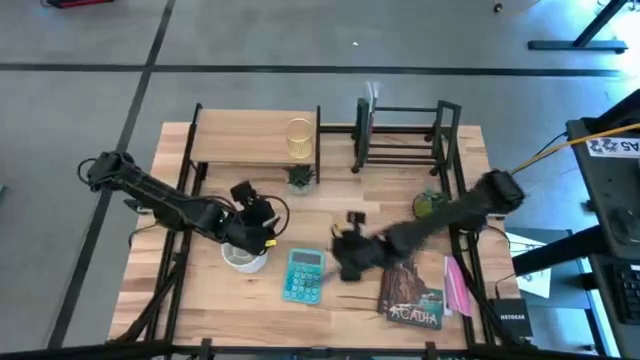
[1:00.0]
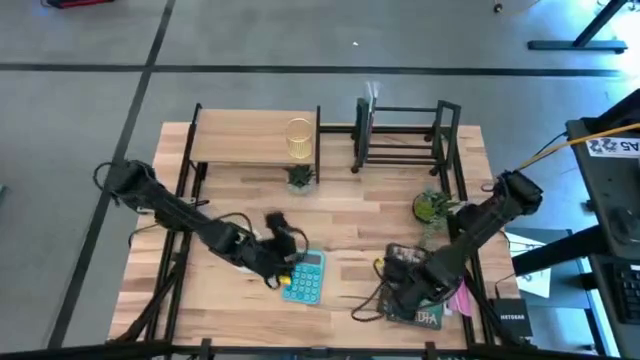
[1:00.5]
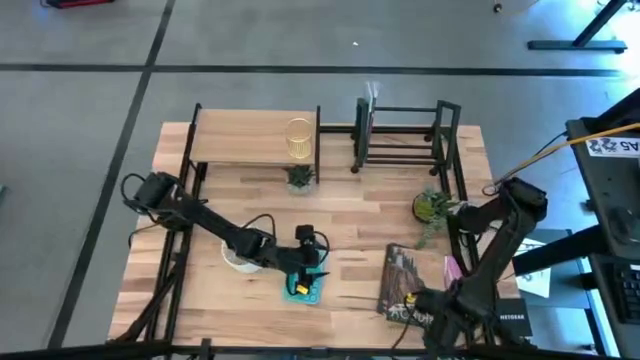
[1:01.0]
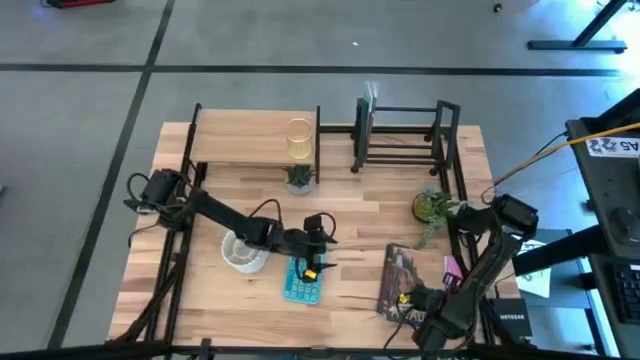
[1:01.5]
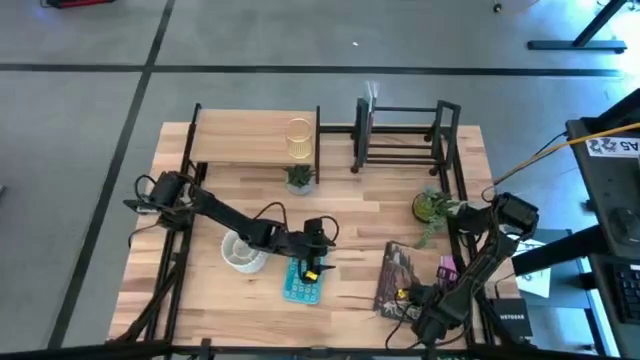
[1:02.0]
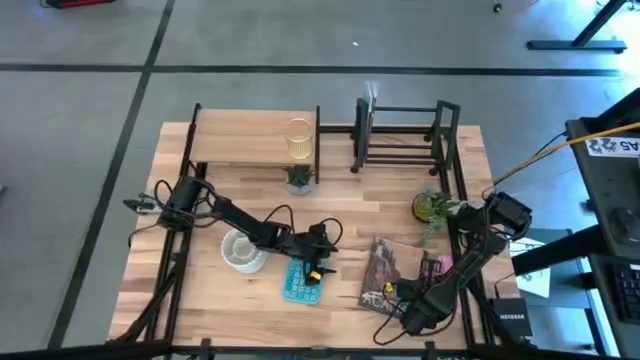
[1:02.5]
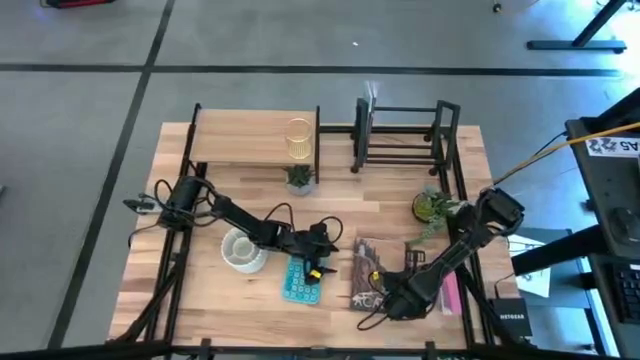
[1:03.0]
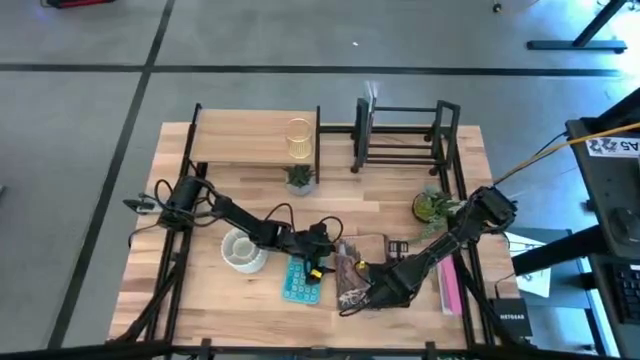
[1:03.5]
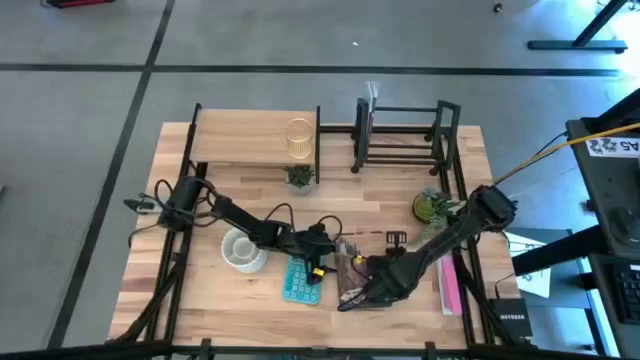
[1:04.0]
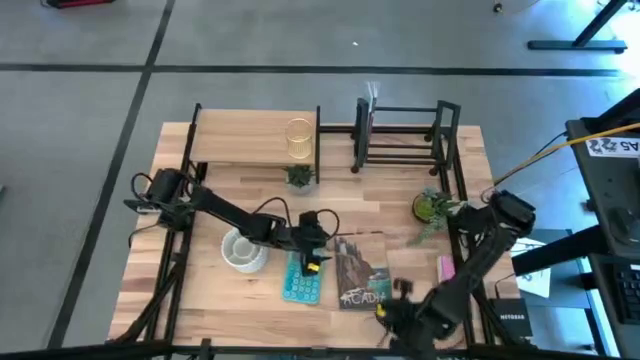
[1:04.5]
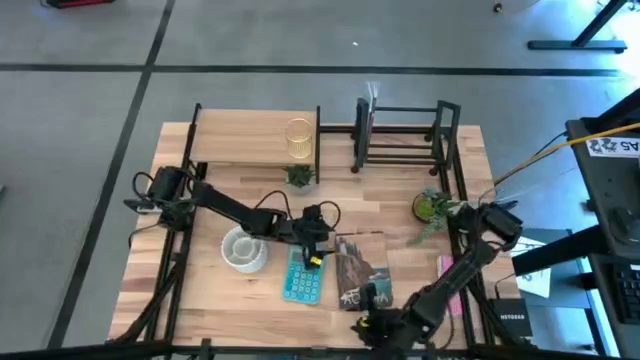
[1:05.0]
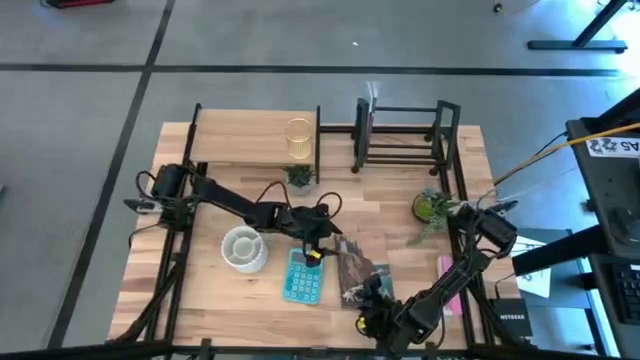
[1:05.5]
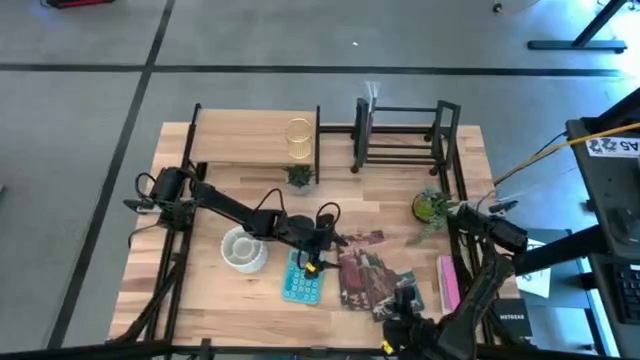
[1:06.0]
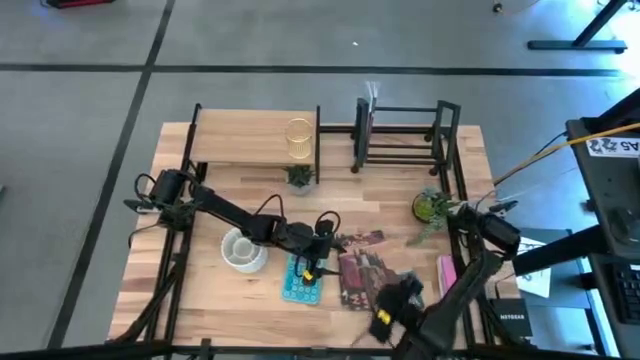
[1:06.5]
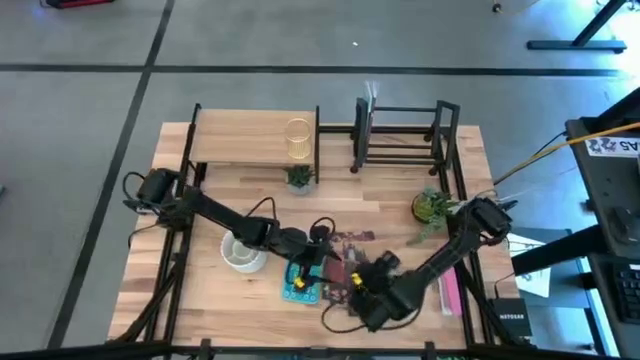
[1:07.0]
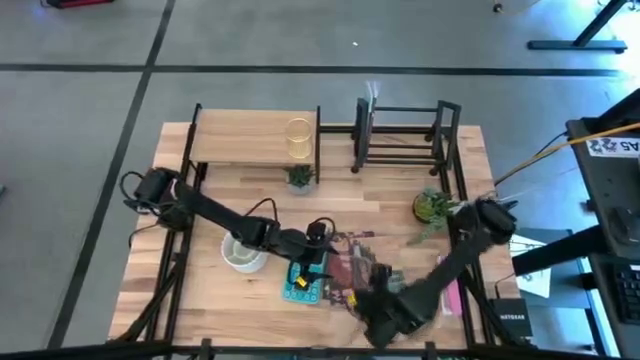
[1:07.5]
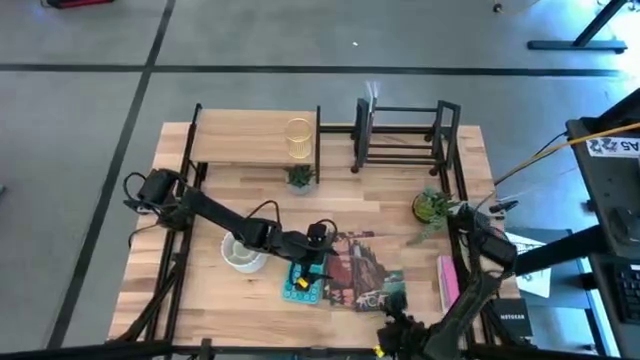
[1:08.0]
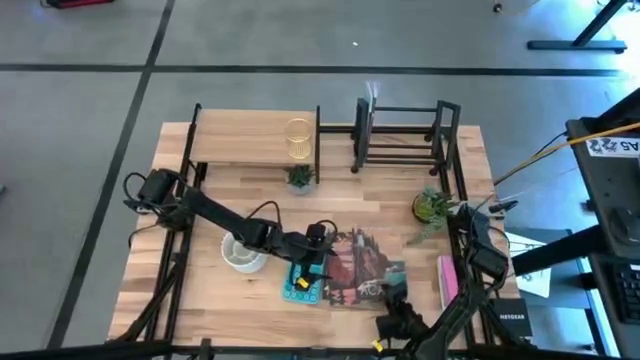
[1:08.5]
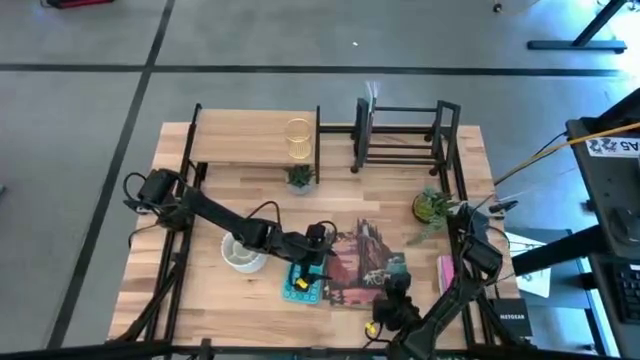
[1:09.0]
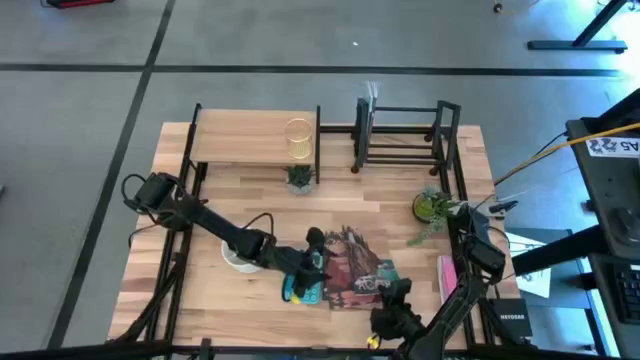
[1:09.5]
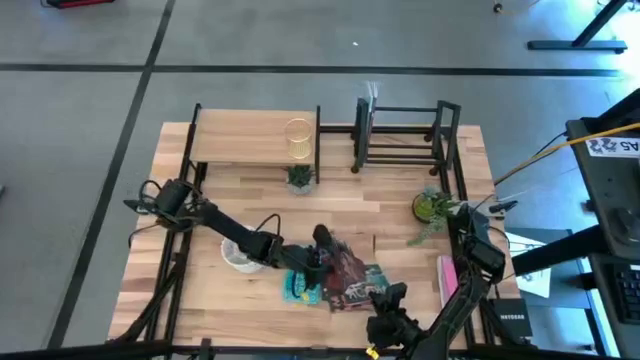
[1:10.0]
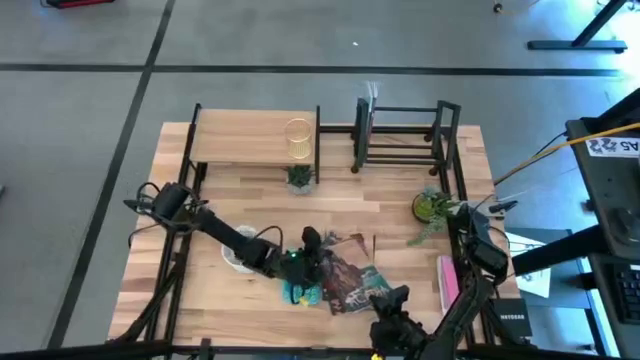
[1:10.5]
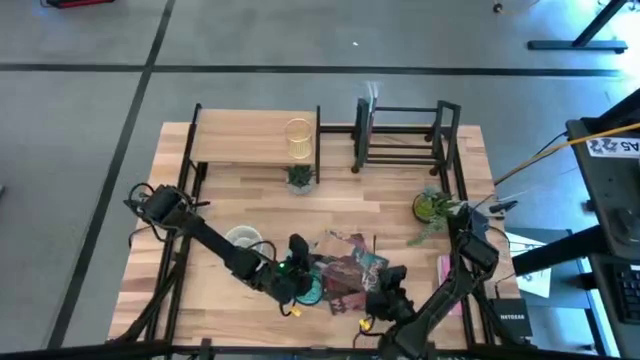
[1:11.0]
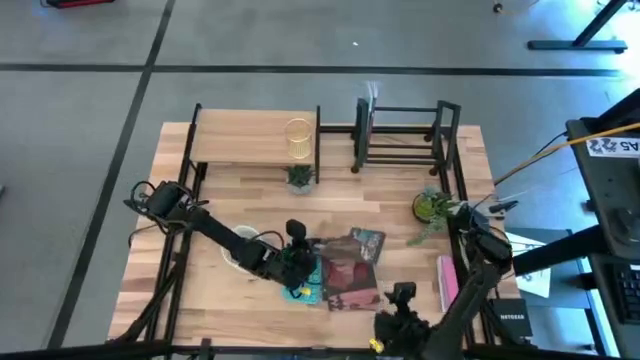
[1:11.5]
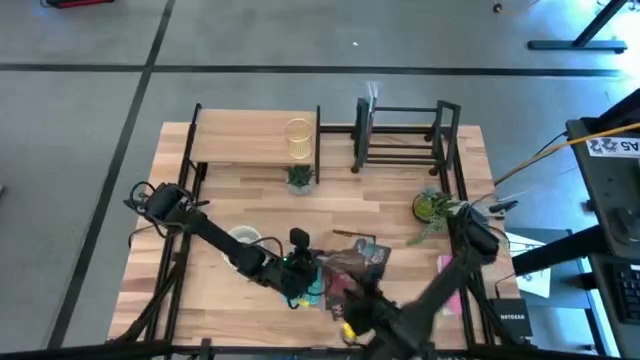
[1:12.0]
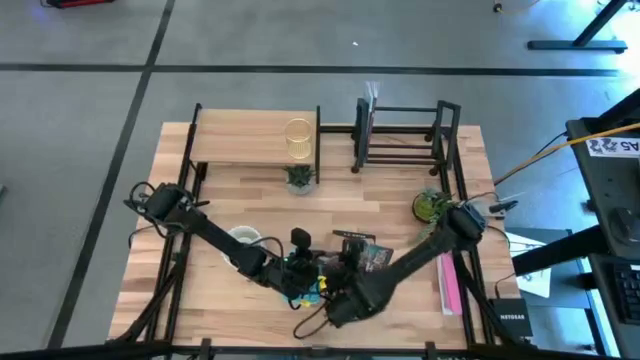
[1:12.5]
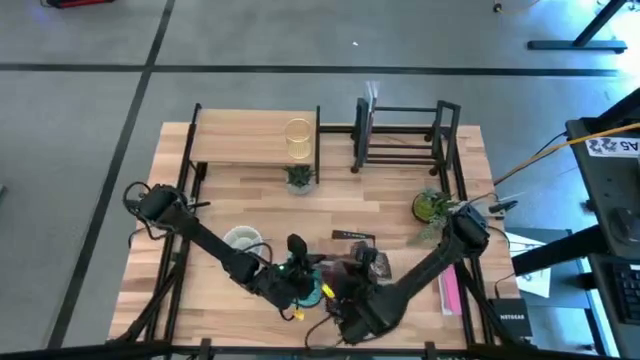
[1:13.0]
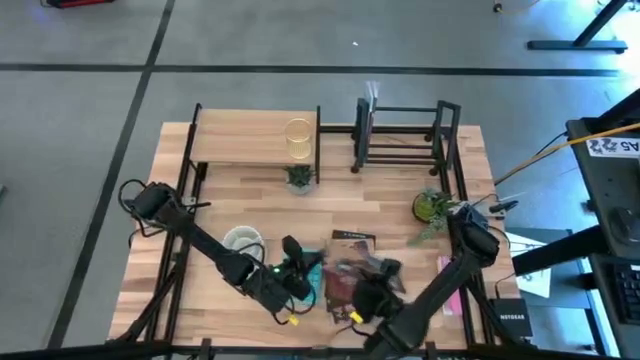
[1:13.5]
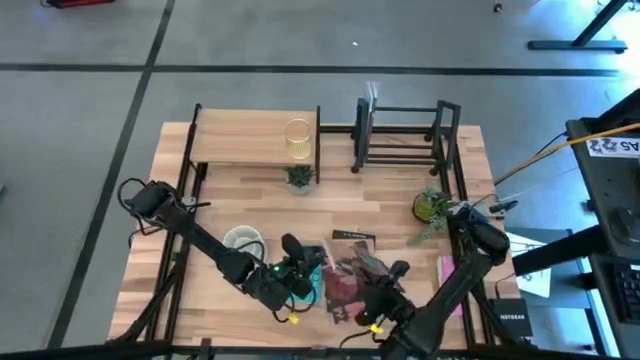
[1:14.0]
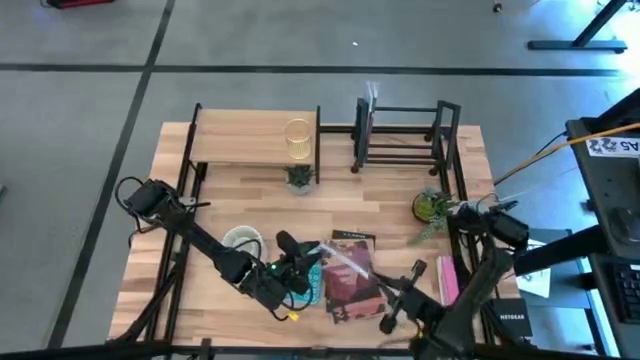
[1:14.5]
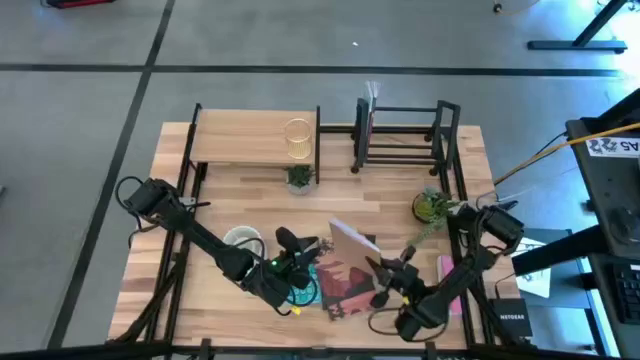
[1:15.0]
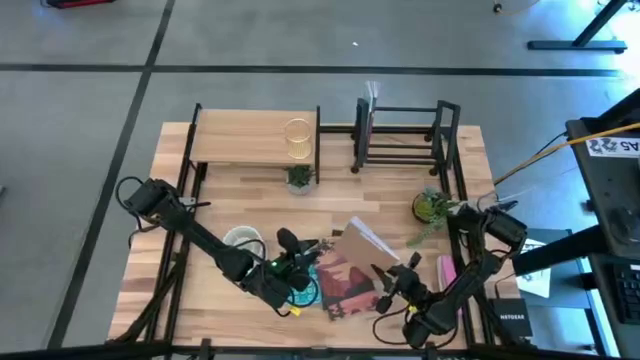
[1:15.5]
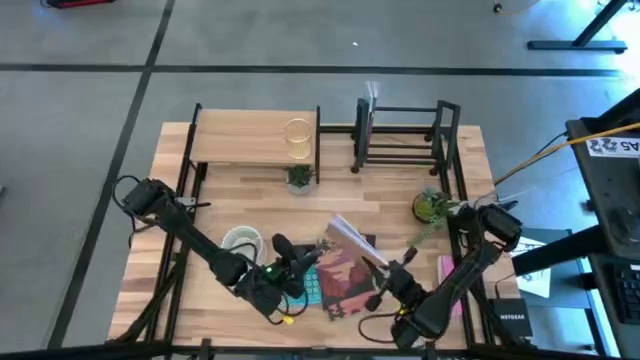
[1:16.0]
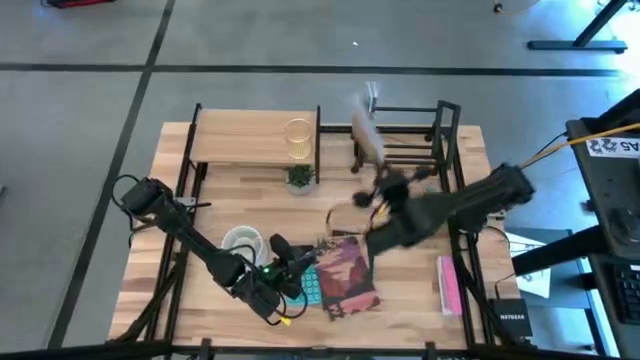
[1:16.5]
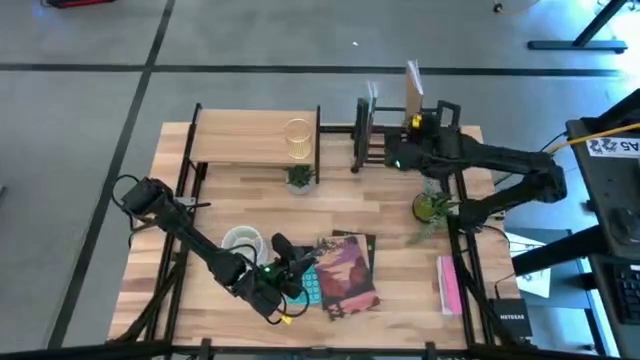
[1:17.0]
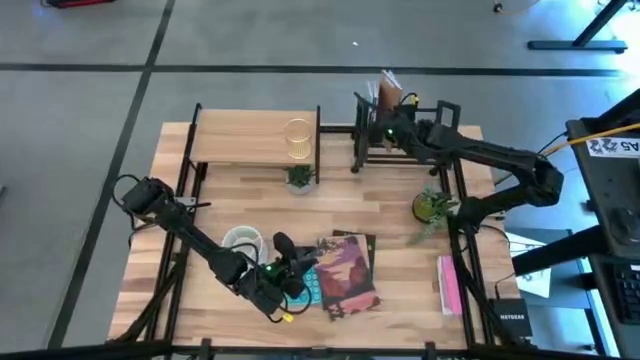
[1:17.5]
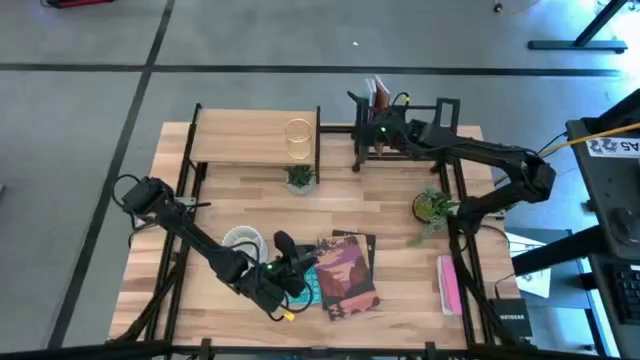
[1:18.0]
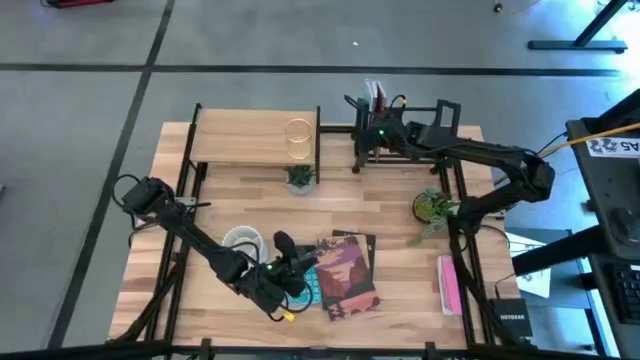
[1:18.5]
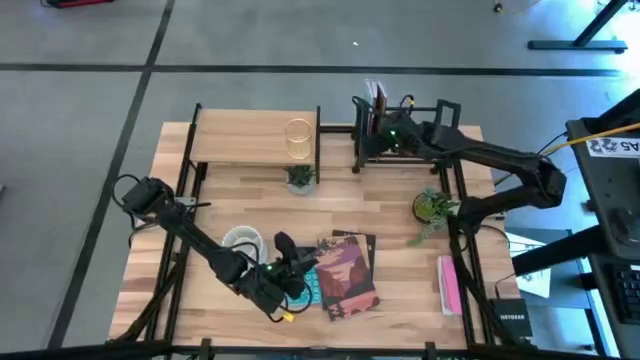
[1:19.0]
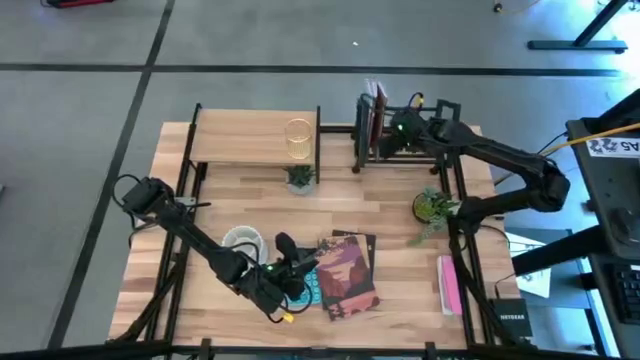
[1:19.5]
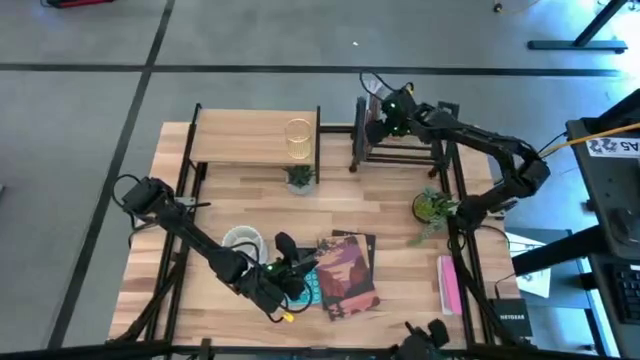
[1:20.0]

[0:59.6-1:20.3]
Task: Stock shelves
Put the brown book on the book shelf

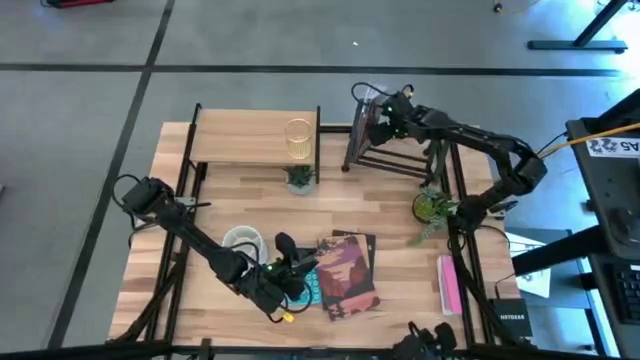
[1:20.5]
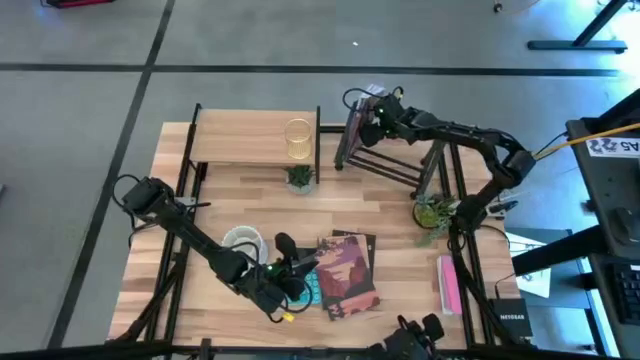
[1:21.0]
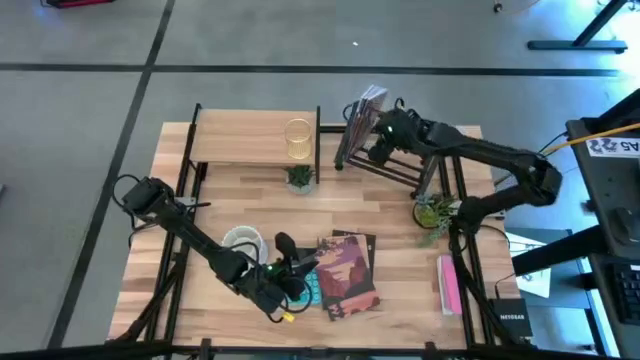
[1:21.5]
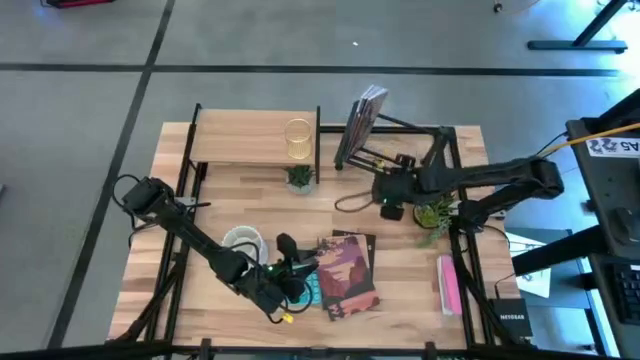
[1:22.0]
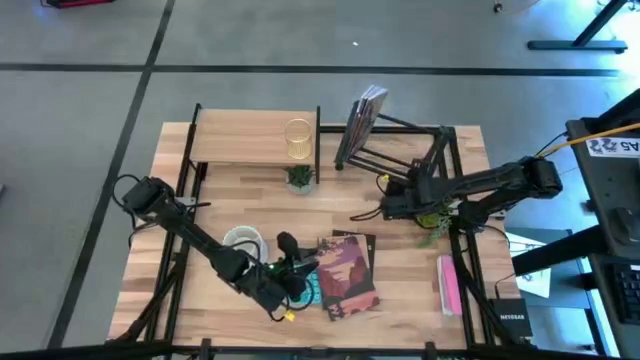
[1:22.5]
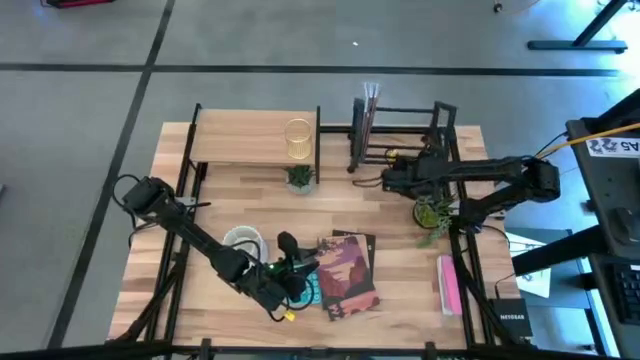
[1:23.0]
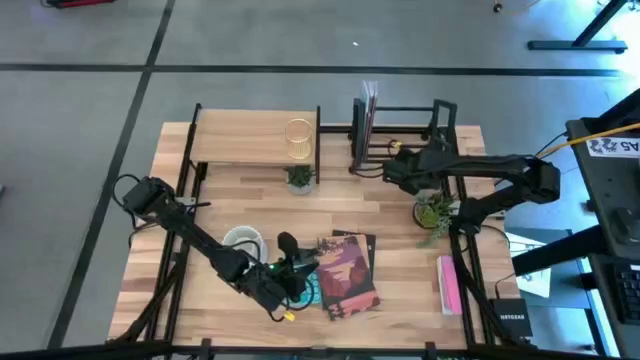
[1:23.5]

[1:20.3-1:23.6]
Adjust the book shelf
